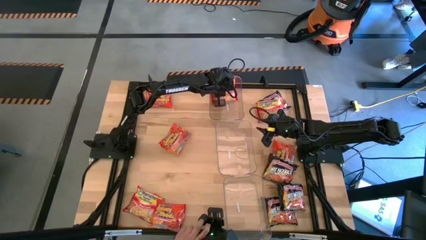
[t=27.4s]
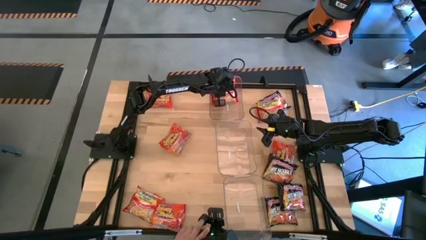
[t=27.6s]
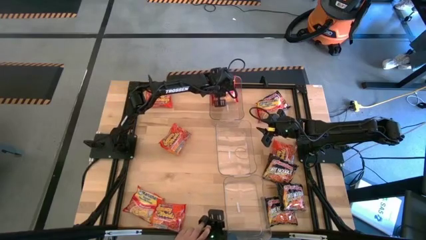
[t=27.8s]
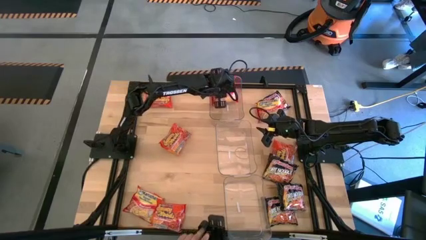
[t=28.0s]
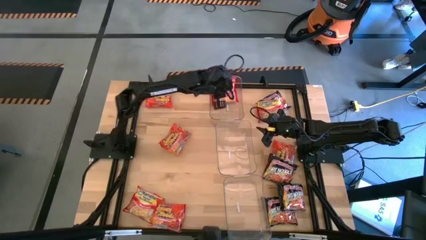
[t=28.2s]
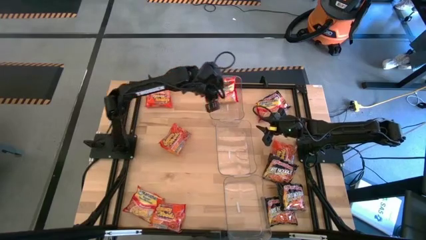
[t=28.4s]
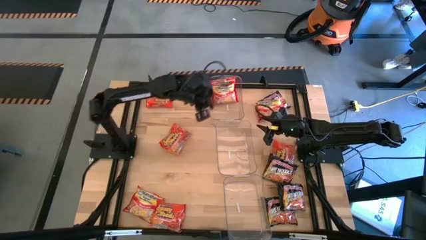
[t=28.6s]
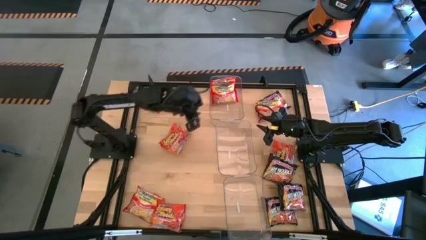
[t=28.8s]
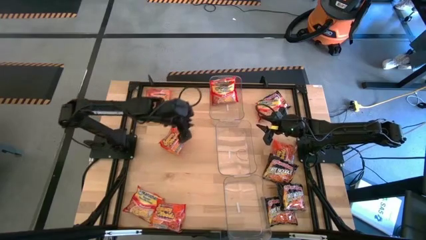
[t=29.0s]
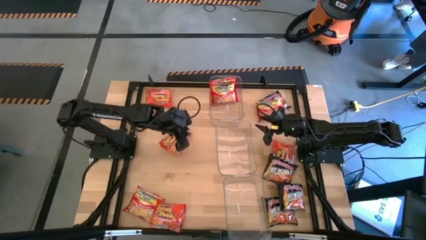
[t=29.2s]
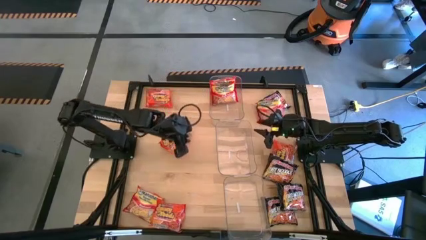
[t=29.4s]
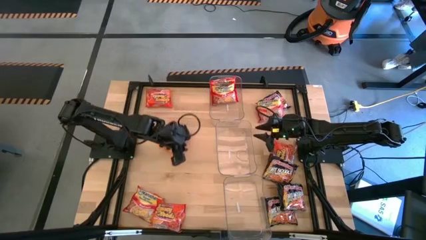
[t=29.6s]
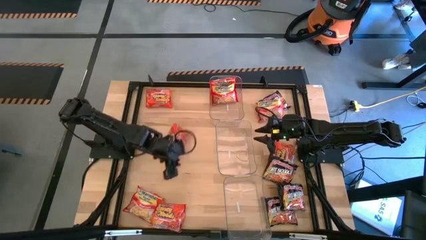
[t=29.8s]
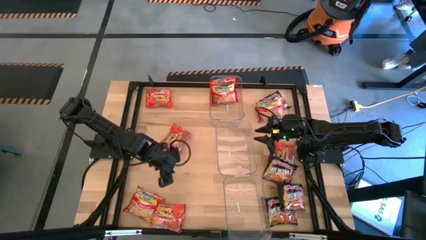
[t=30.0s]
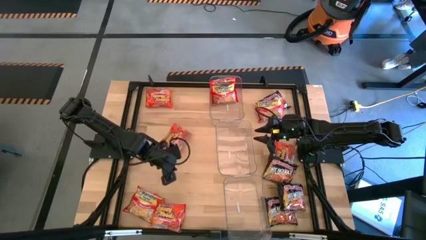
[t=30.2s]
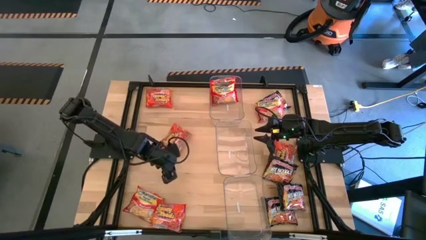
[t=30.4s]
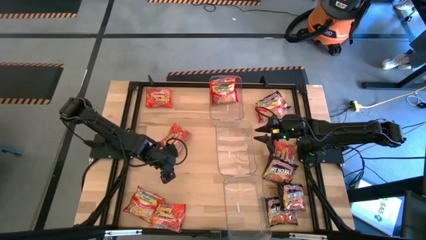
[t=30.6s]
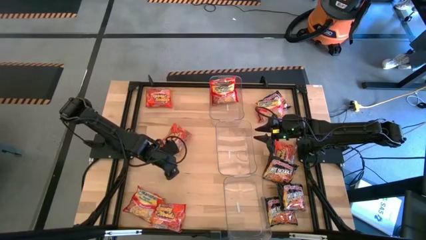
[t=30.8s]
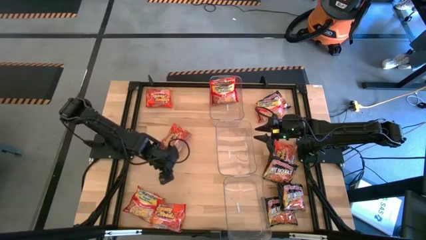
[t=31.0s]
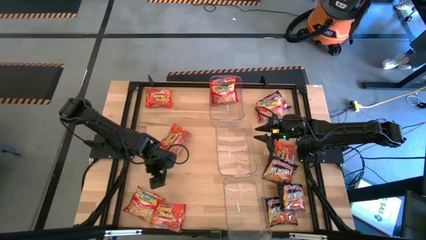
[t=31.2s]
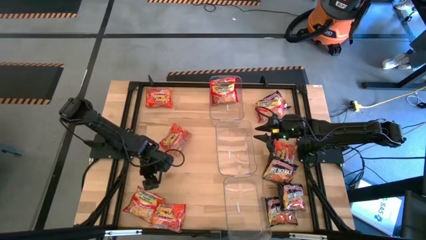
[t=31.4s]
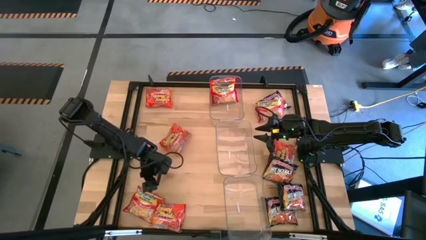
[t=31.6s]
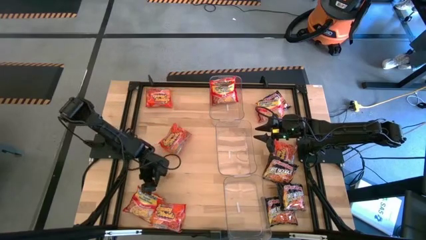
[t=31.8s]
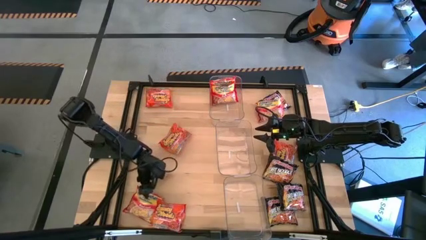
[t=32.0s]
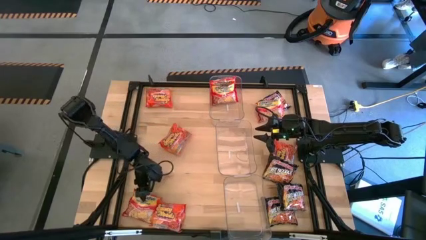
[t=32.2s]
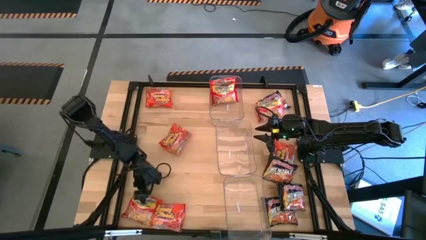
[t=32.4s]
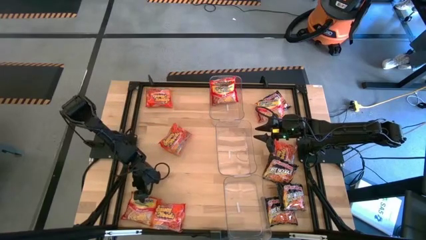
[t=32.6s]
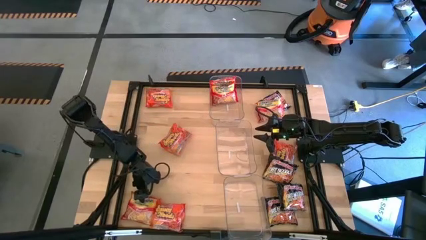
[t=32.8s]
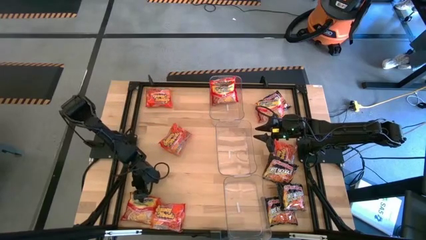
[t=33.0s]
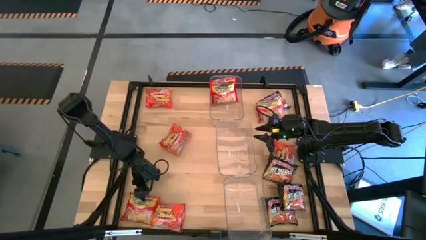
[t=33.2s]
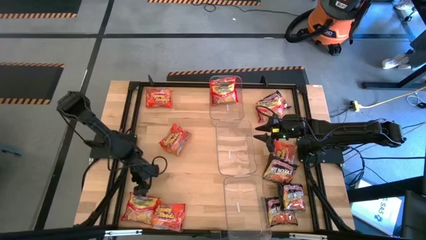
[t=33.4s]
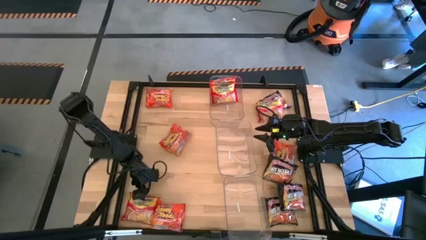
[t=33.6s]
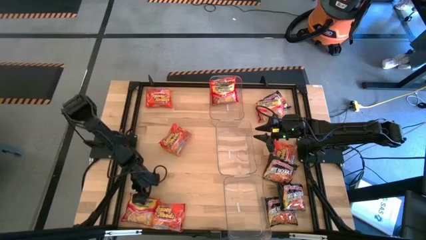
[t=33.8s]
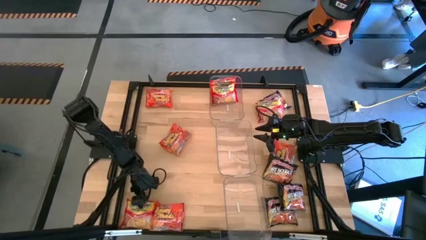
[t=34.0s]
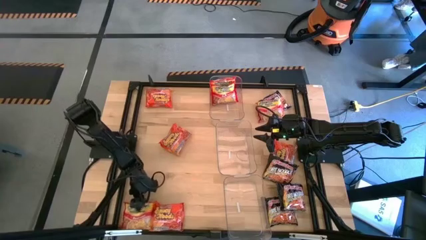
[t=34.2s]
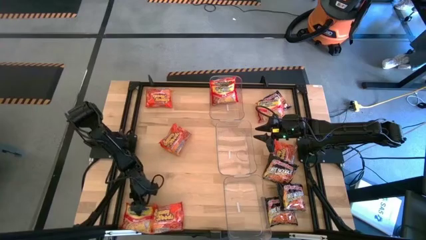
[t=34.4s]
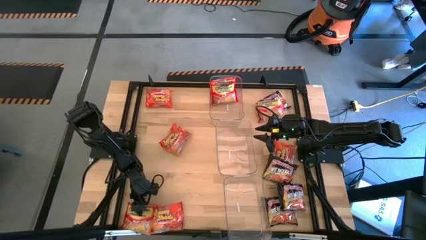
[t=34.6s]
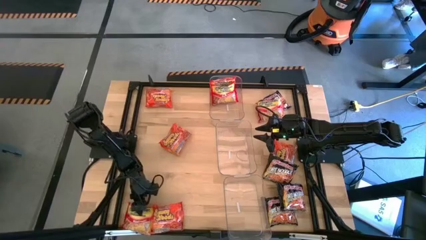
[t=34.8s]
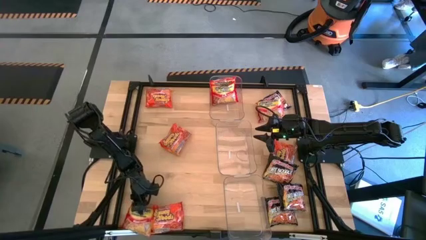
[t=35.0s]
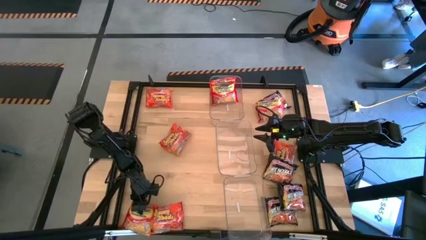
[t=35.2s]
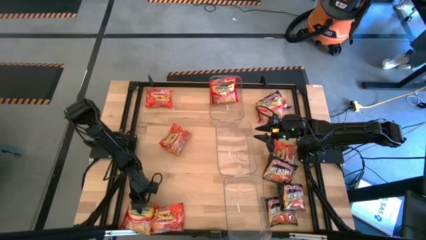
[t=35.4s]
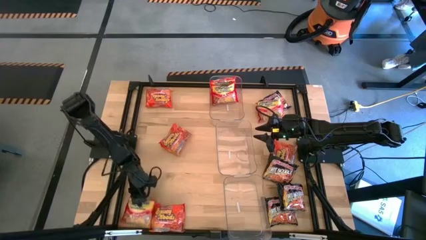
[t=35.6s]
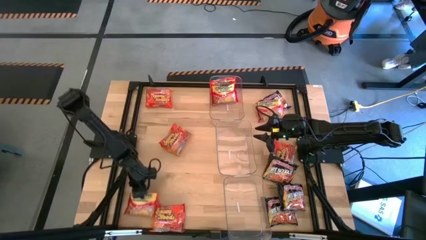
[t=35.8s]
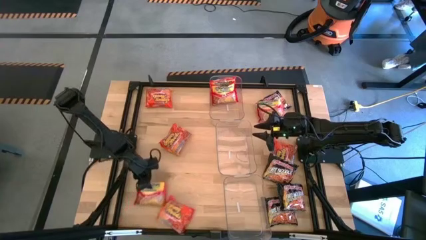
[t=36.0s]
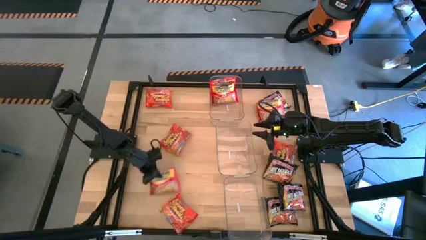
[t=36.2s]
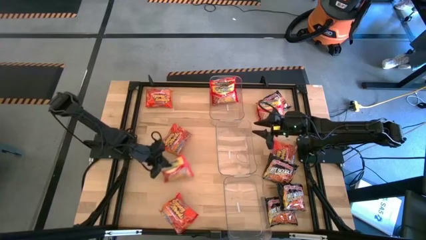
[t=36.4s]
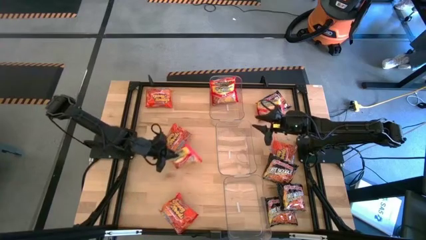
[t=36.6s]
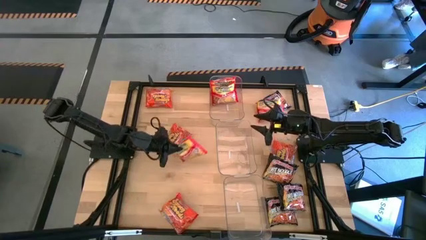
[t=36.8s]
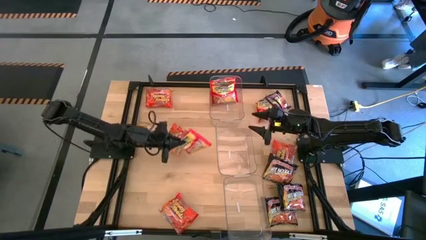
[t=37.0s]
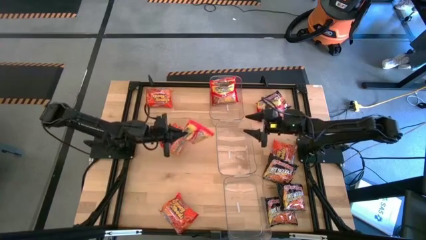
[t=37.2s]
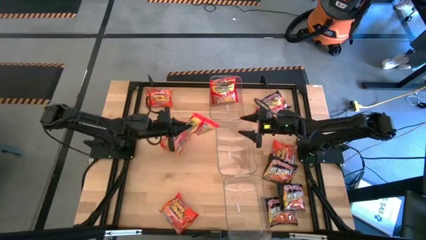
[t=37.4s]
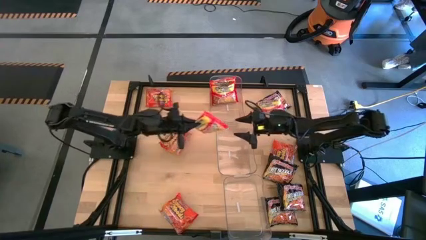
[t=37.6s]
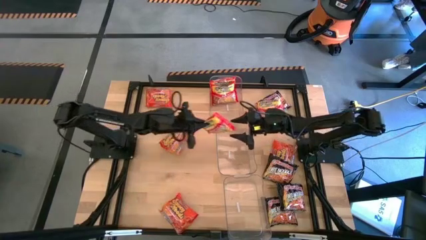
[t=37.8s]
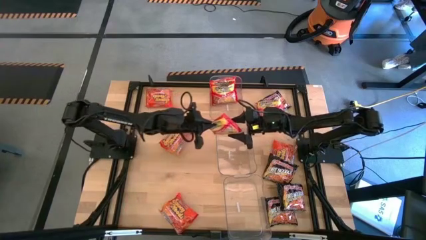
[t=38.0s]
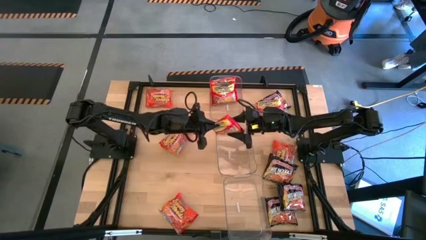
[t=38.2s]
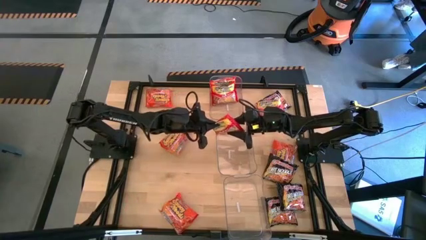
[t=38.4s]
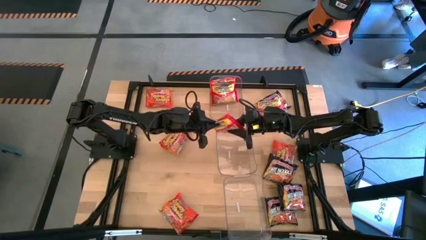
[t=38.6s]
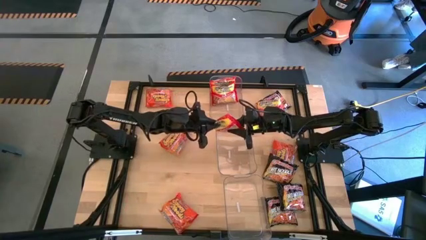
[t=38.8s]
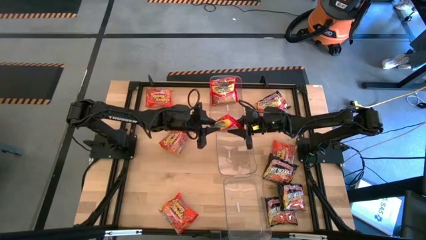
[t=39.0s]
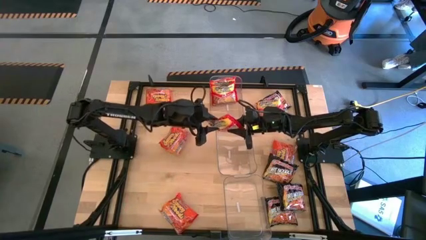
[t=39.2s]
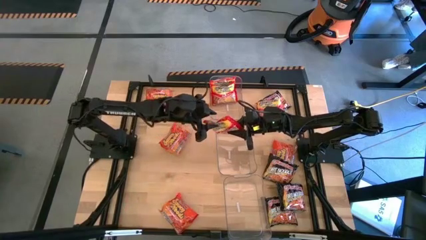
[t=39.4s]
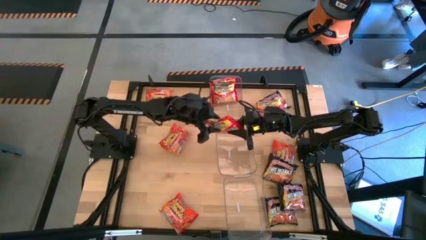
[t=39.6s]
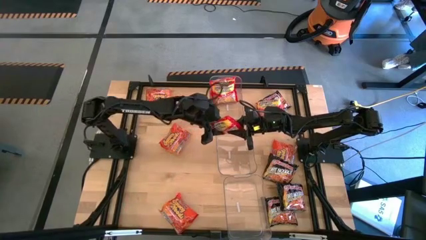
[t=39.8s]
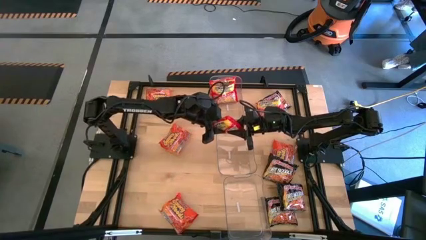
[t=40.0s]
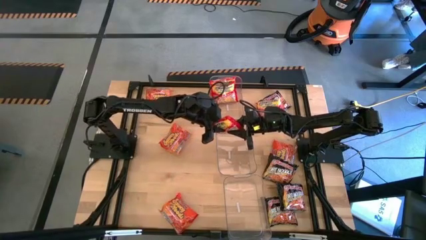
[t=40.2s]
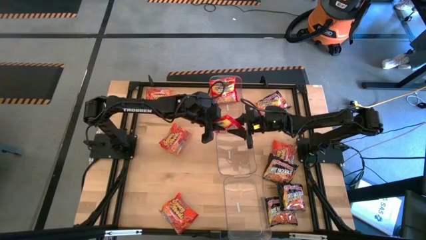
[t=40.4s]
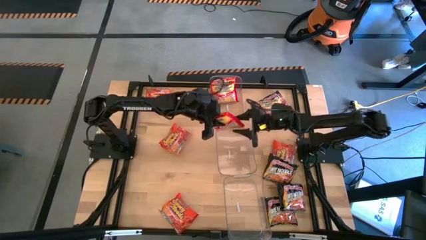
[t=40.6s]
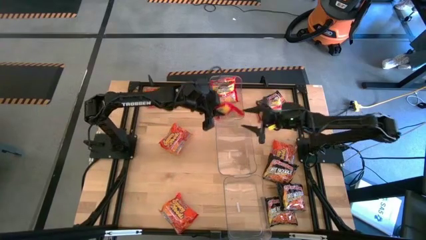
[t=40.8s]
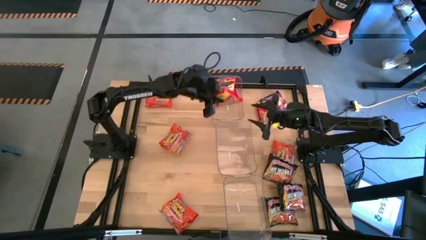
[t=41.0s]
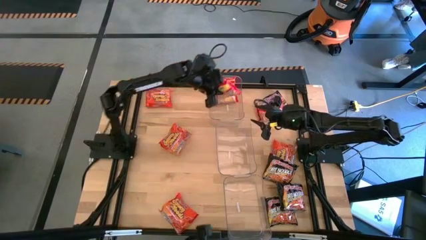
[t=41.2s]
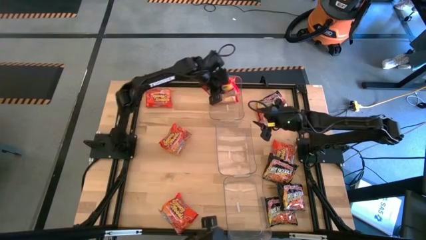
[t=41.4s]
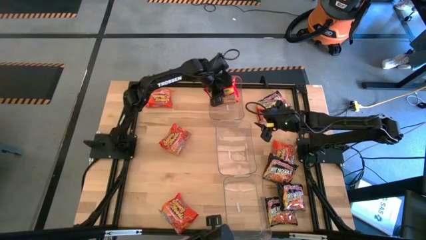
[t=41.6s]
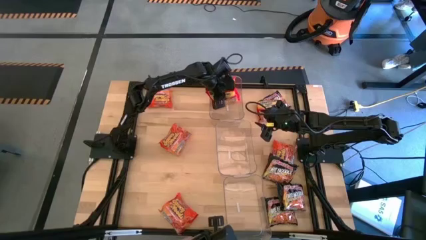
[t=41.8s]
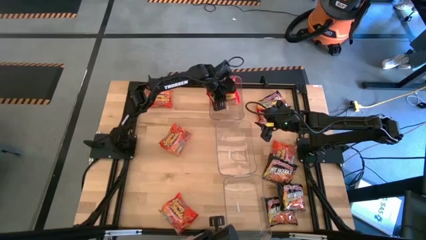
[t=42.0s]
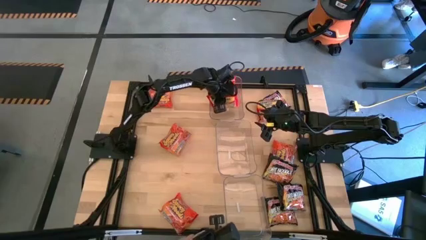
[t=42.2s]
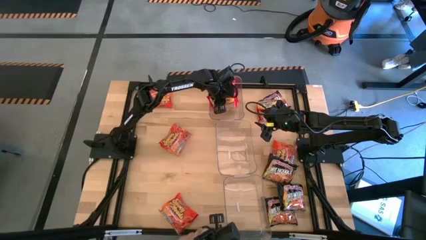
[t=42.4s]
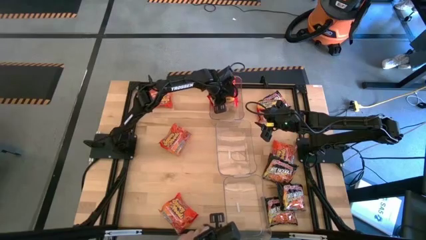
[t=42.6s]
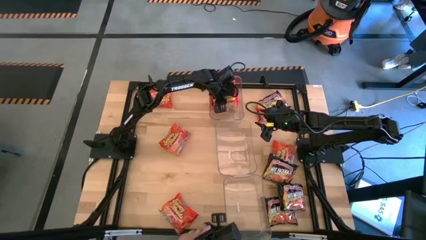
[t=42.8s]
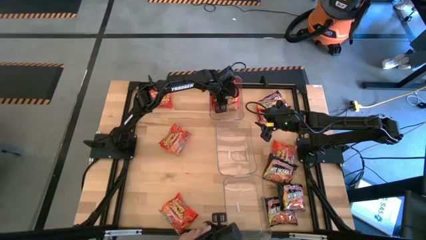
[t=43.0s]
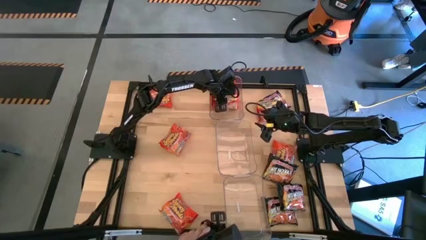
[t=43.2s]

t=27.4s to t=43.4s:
Task: Sort Maruchan noodles
Put the red noodle pack into the top transparent bin
